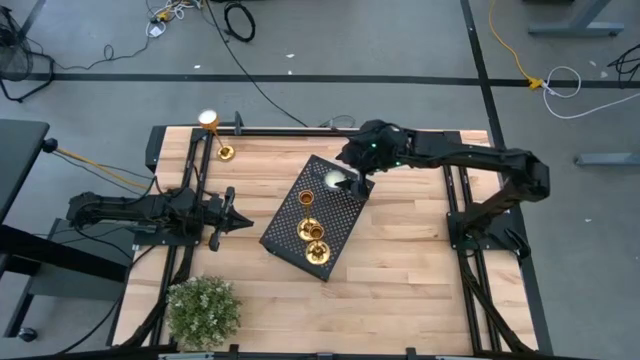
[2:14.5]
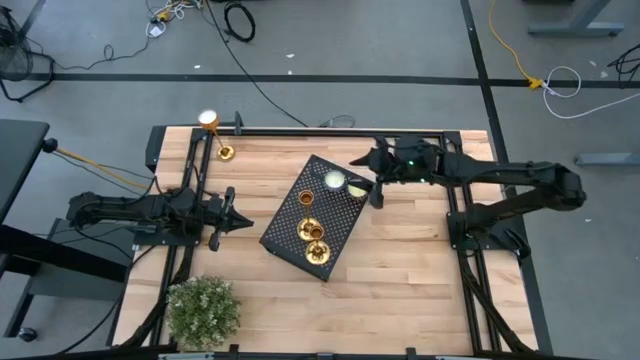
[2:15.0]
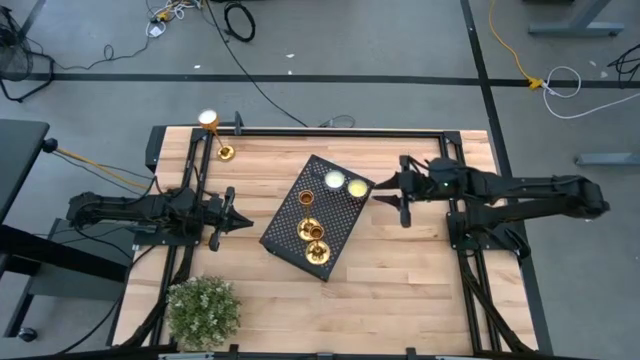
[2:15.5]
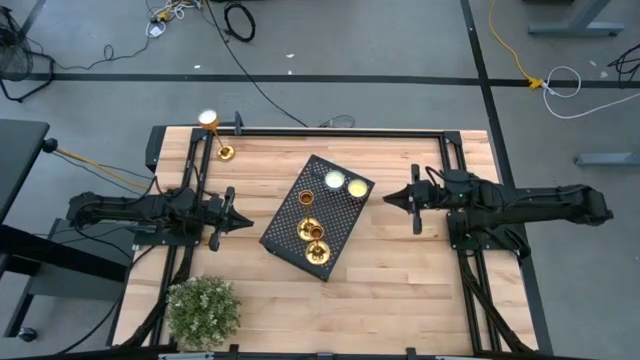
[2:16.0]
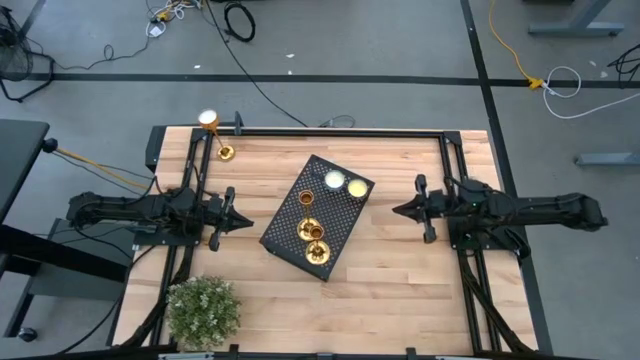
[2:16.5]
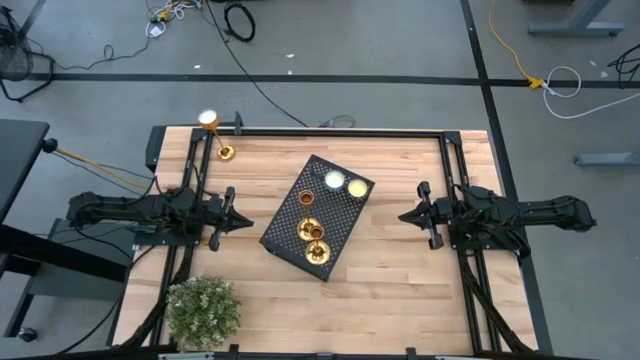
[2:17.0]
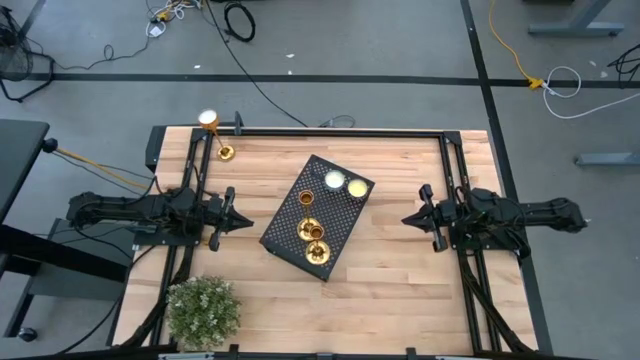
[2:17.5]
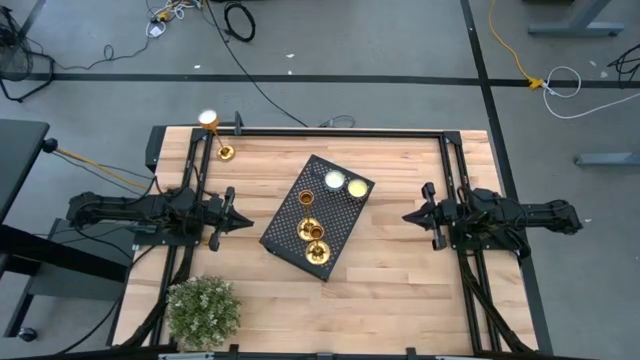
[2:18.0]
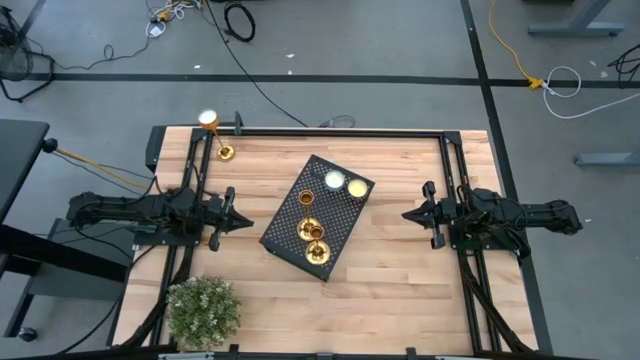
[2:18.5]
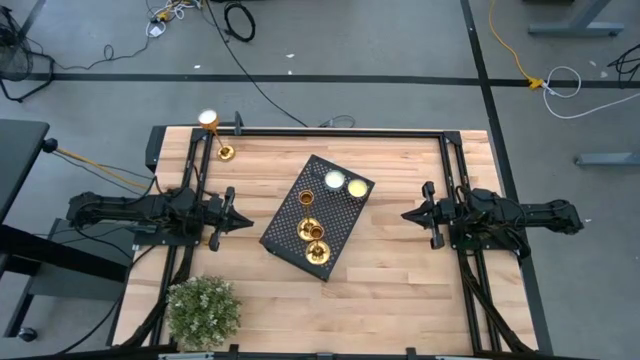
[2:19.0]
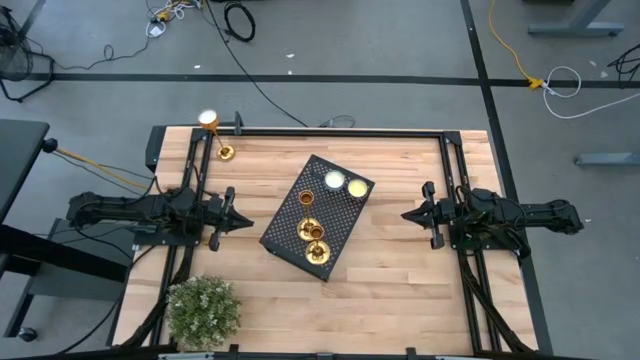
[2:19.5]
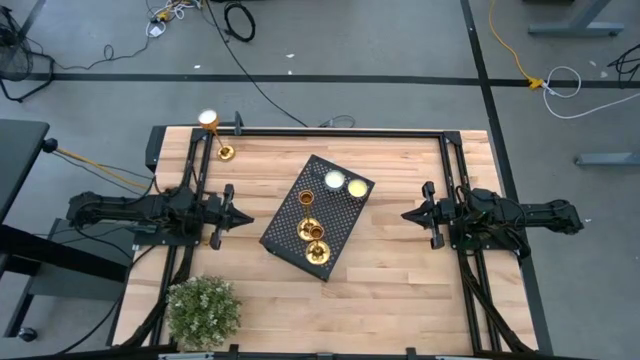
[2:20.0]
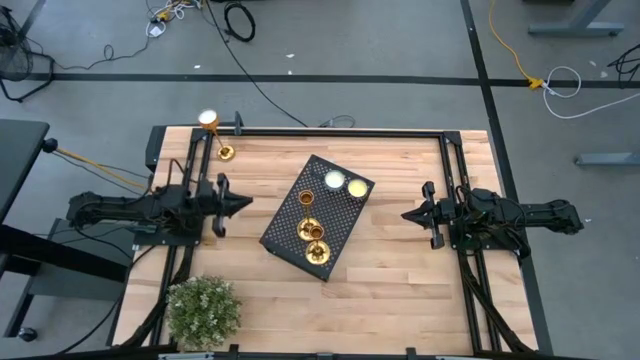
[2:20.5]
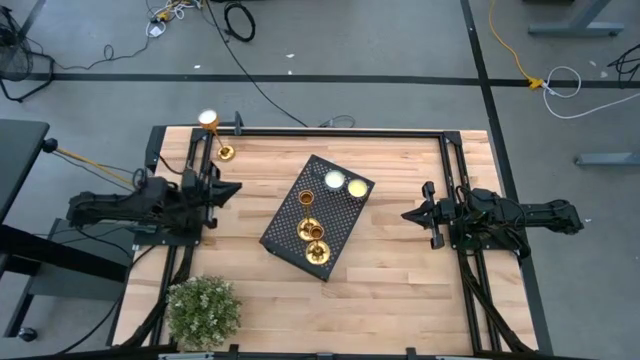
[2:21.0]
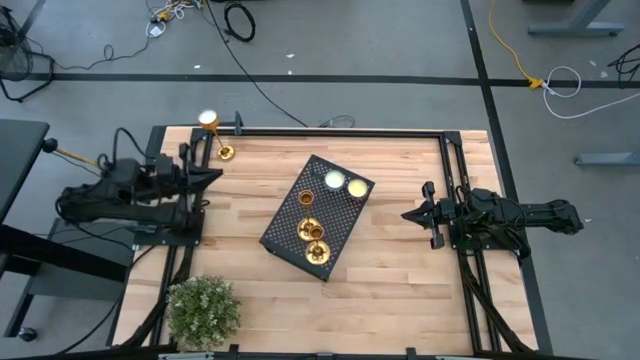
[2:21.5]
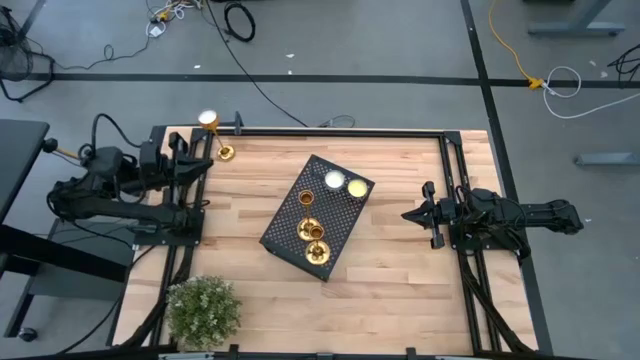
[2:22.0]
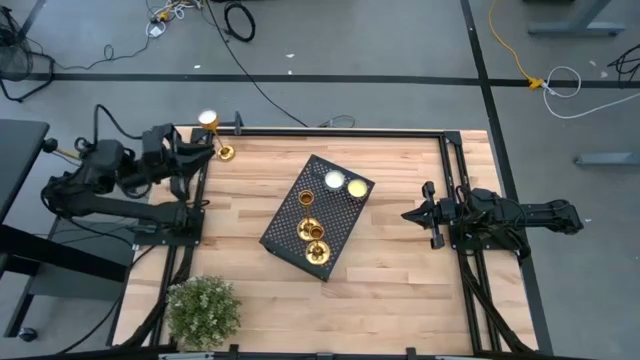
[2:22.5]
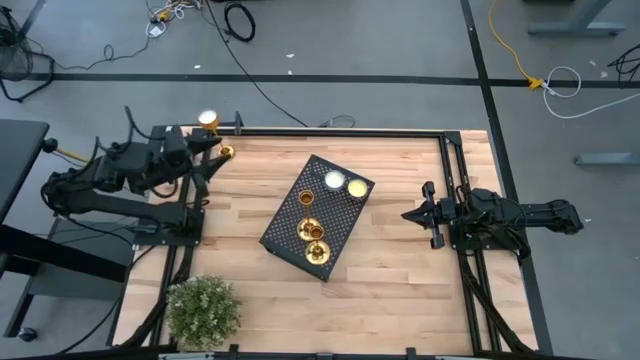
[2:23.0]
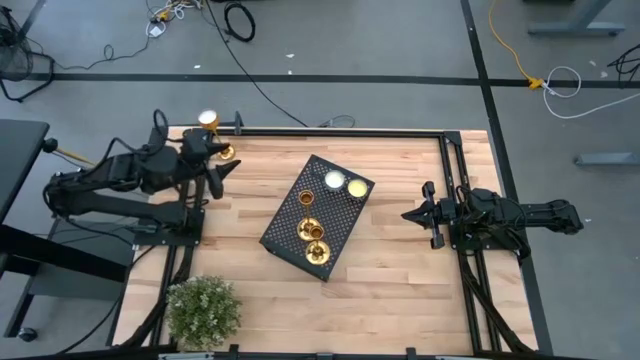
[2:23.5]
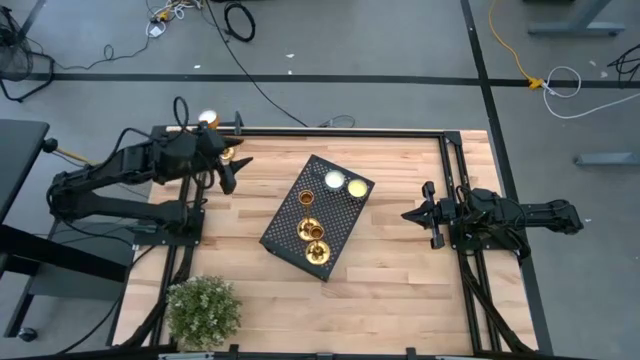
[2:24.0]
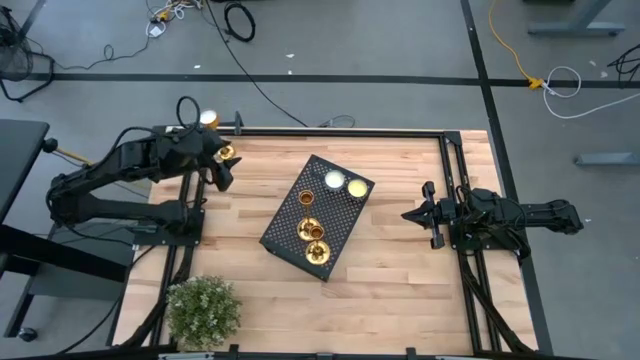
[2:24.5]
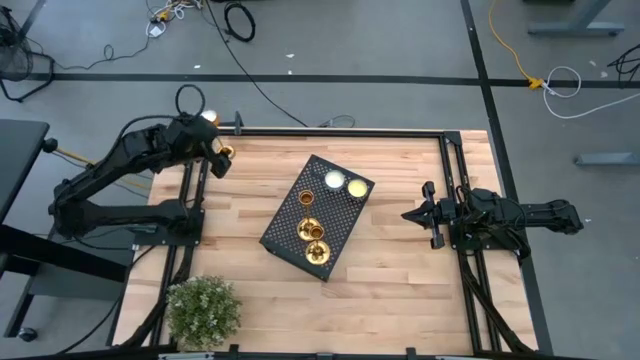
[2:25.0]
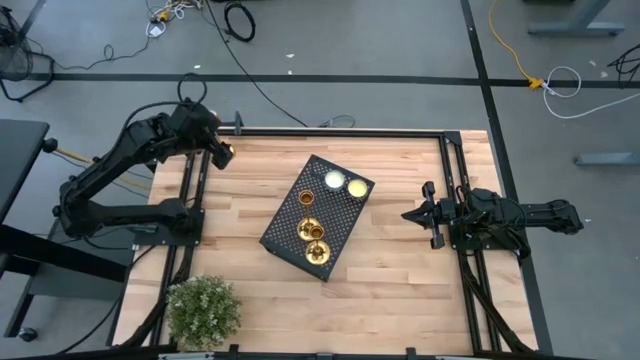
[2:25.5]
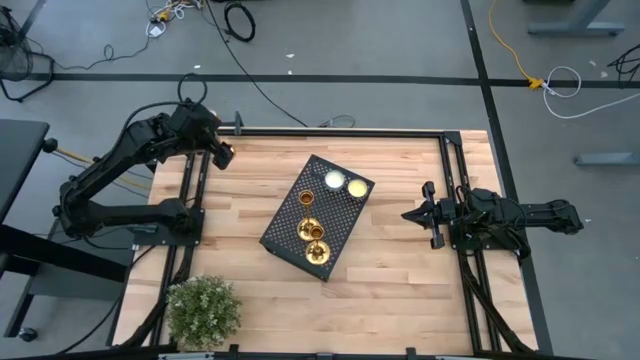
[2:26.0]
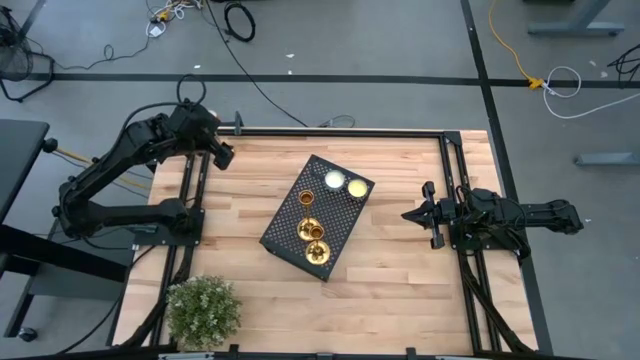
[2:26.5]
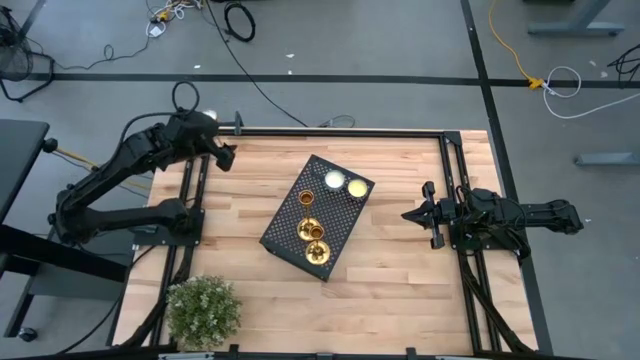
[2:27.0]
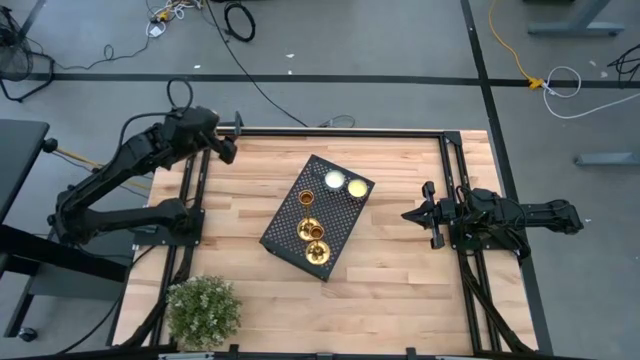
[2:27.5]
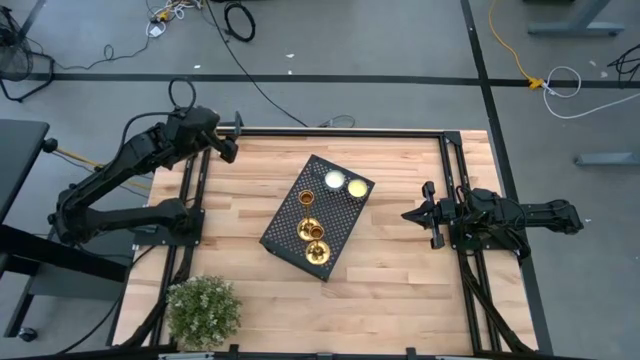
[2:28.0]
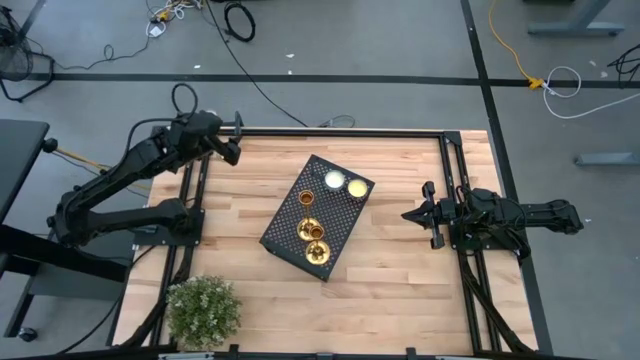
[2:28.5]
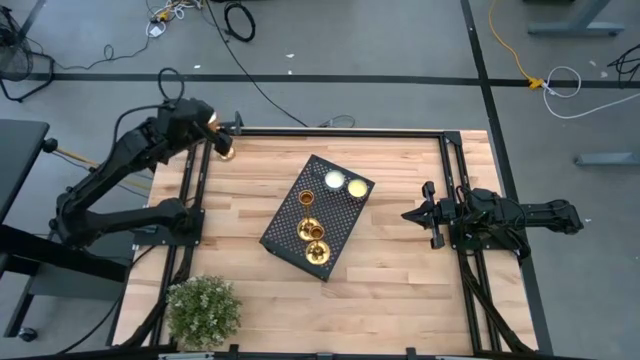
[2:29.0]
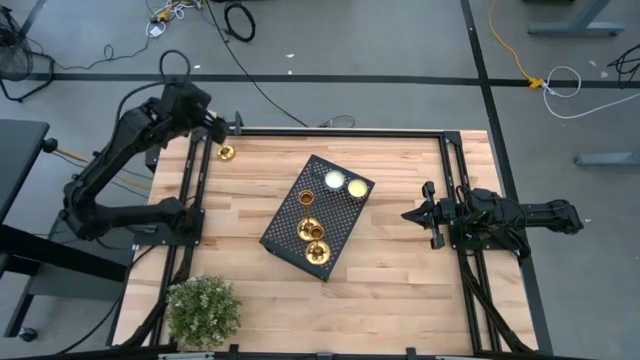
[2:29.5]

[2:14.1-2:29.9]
Task: Stock candles on shelf
Put the orange scented candle on the shelf

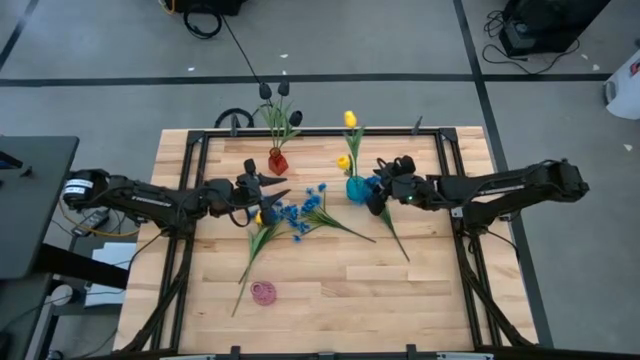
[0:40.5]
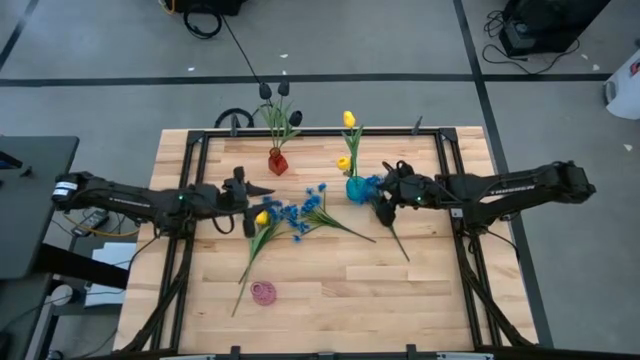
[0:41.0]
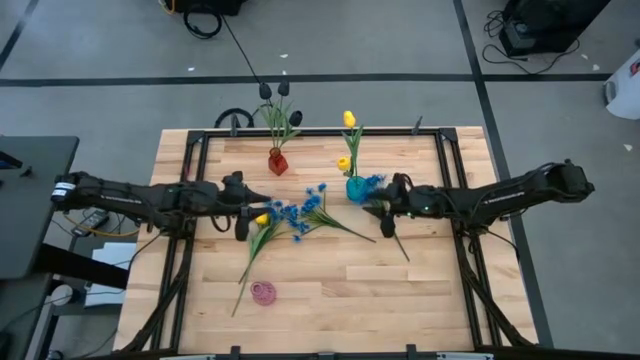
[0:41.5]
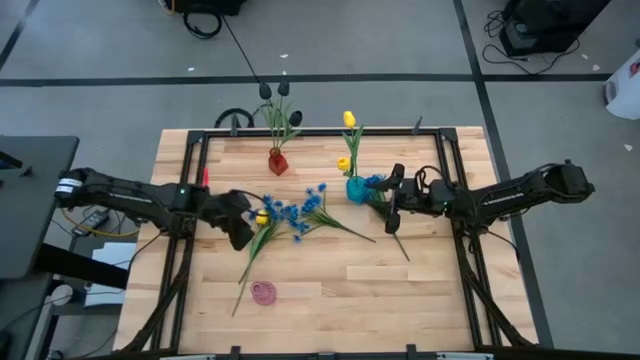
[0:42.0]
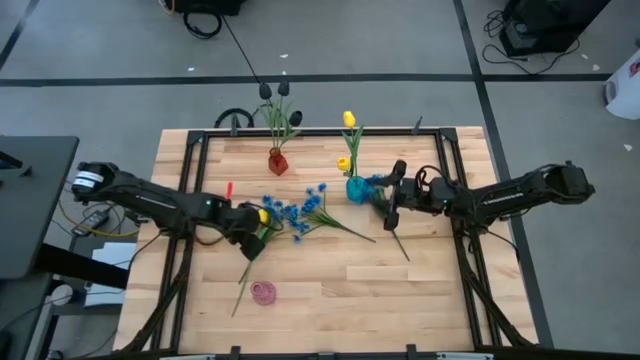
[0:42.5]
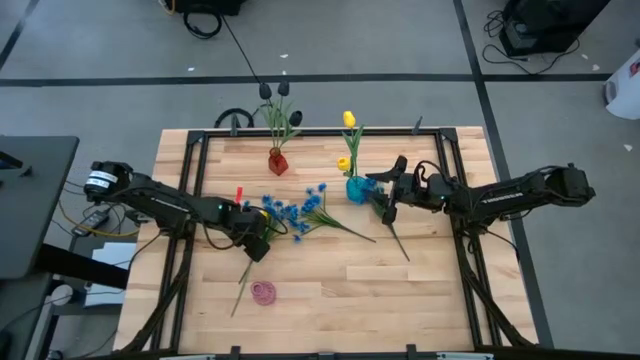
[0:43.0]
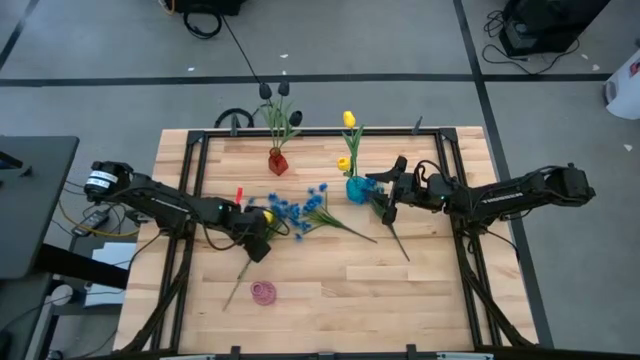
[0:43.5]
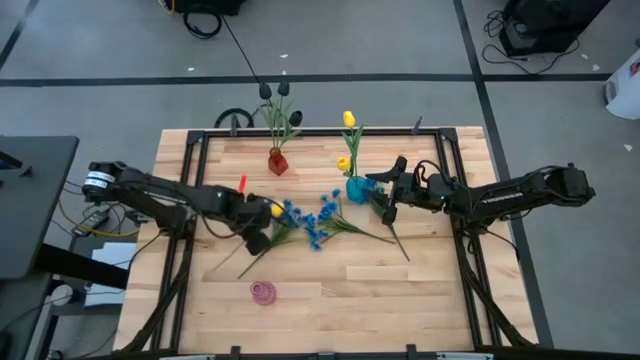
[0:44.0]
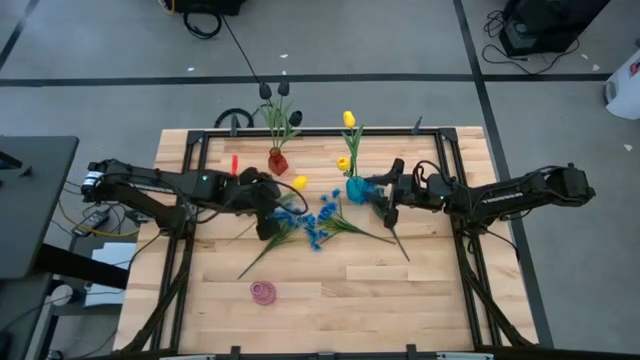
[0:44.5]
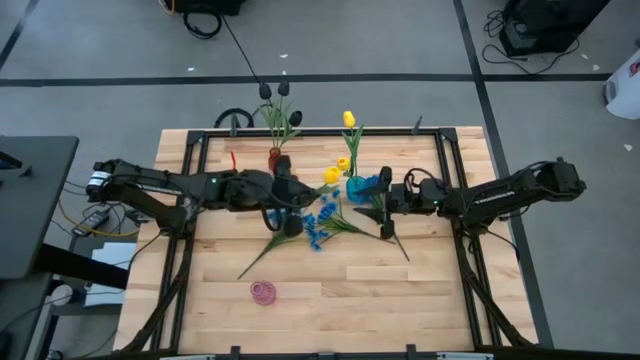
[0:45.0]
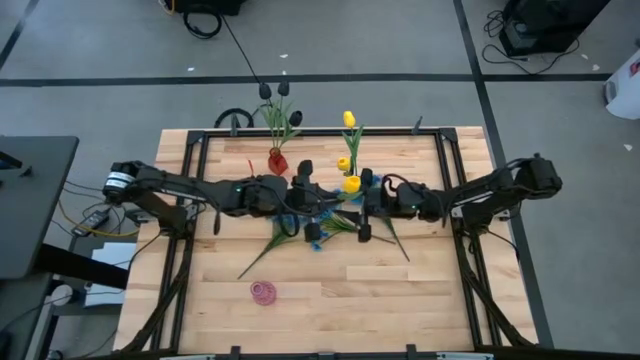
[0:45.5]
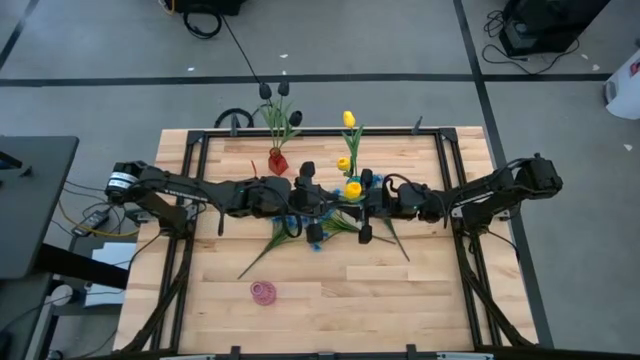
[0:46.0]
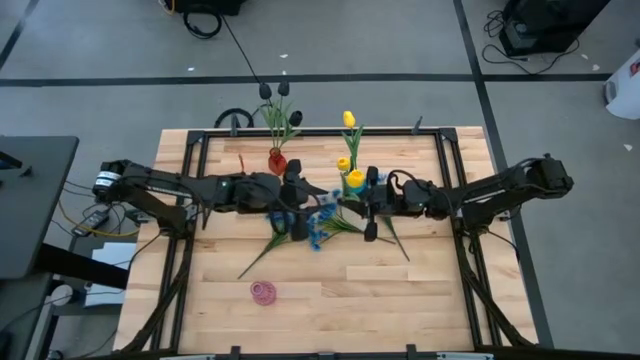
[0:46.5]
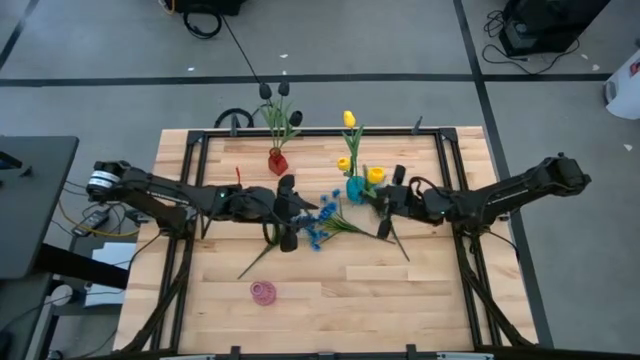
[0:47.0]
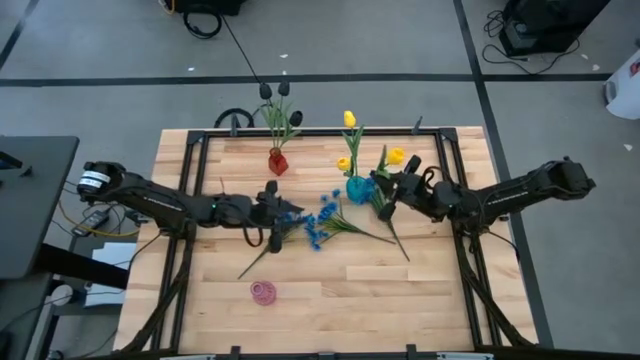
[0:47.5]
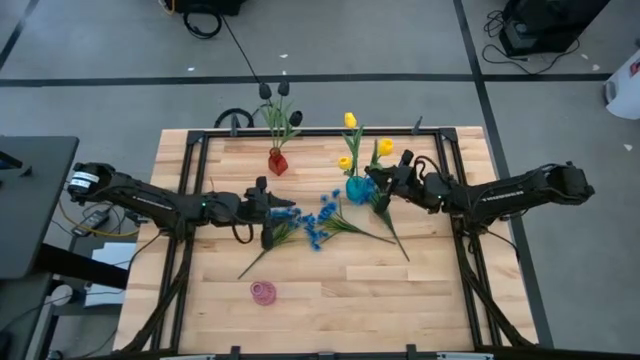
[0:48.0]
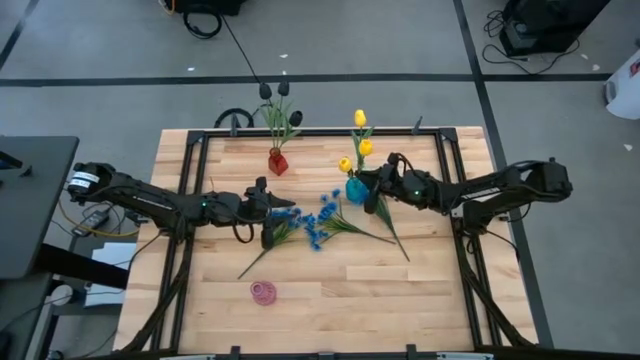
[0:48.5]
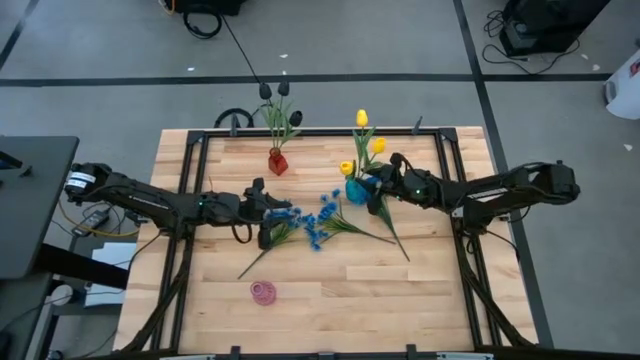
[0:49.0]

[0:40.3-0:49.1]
Task: Sort flowers into vase by color
Put the yellow tulip into the blue vase
